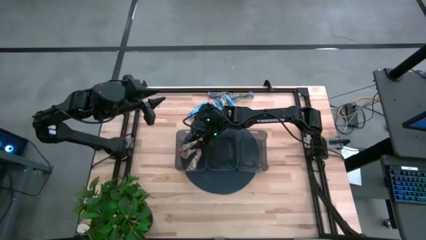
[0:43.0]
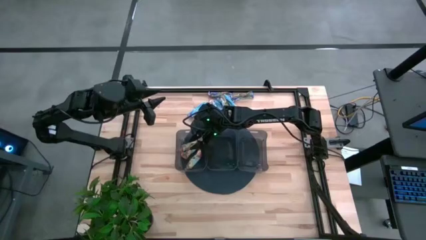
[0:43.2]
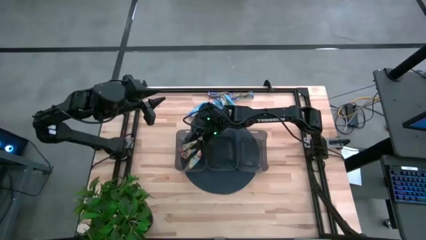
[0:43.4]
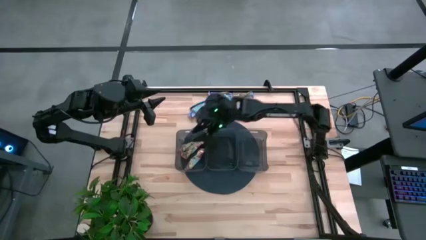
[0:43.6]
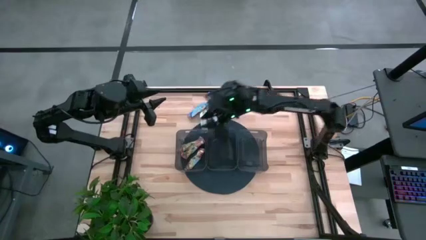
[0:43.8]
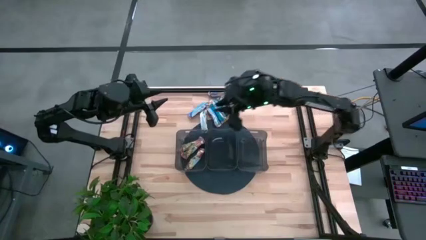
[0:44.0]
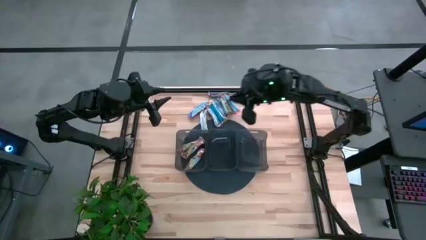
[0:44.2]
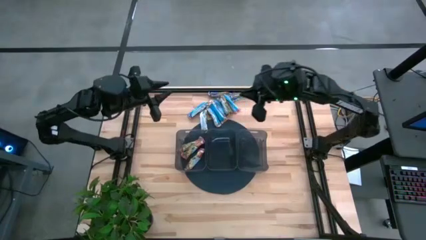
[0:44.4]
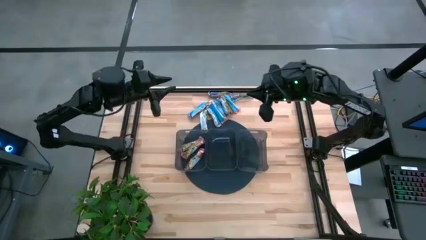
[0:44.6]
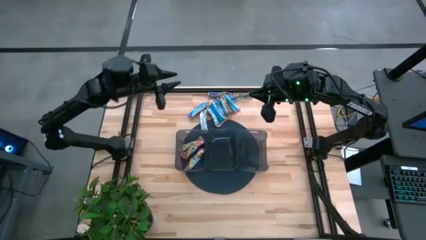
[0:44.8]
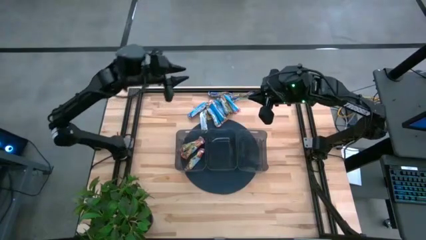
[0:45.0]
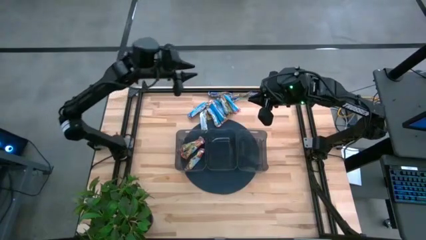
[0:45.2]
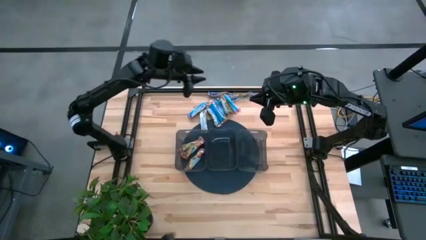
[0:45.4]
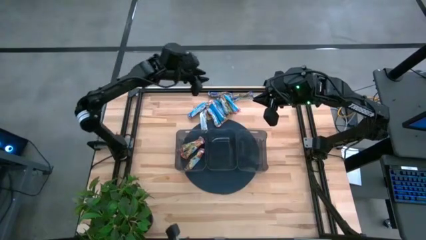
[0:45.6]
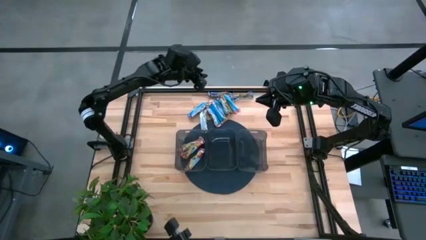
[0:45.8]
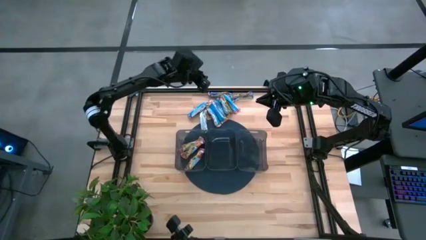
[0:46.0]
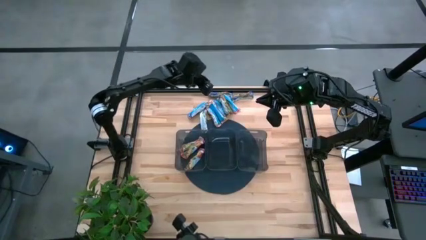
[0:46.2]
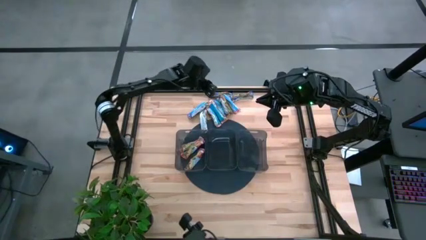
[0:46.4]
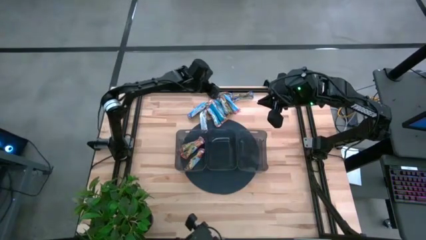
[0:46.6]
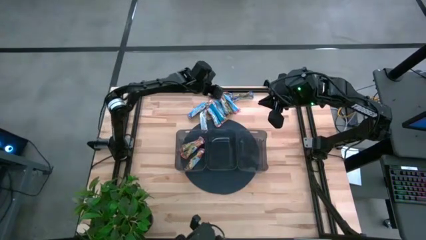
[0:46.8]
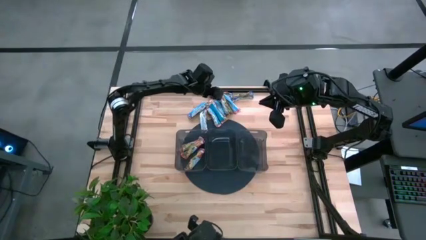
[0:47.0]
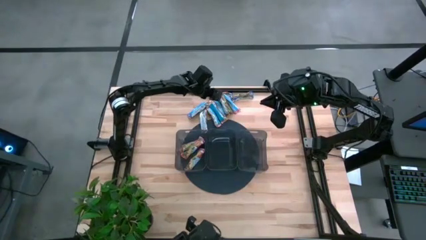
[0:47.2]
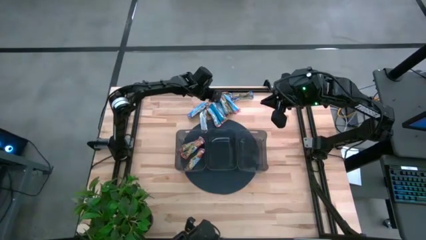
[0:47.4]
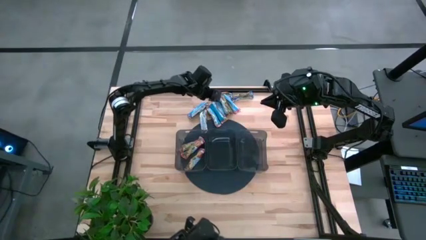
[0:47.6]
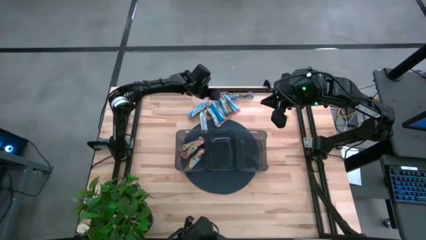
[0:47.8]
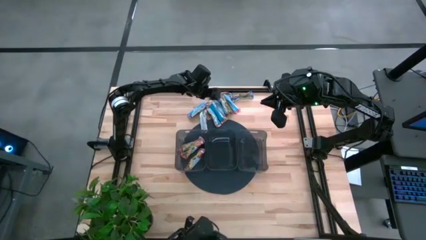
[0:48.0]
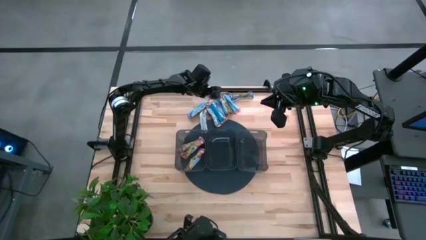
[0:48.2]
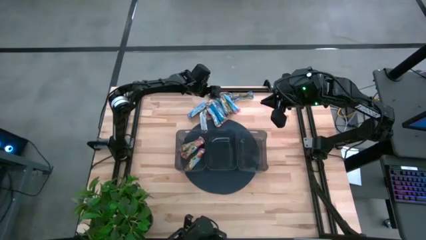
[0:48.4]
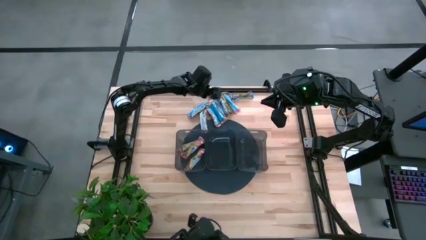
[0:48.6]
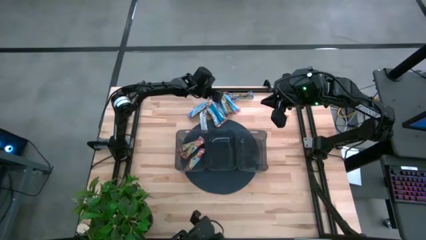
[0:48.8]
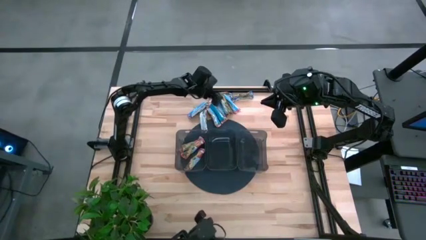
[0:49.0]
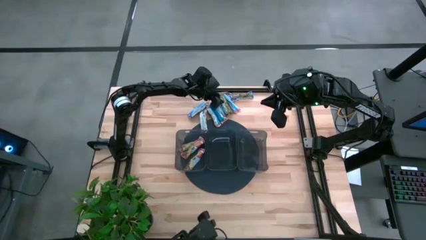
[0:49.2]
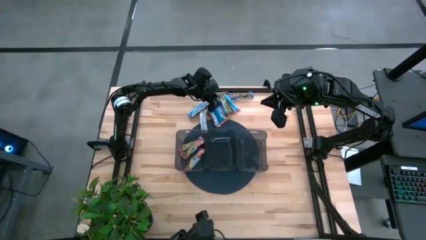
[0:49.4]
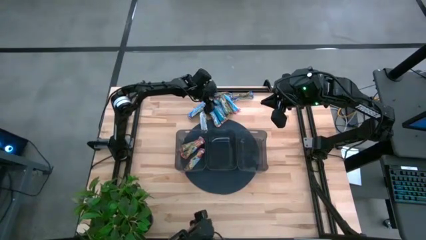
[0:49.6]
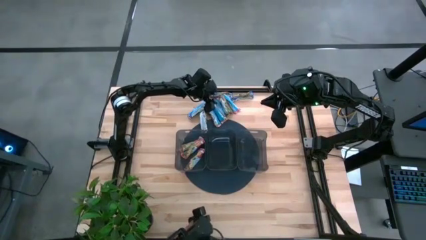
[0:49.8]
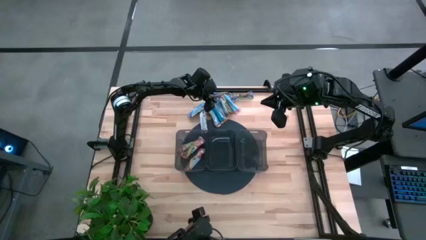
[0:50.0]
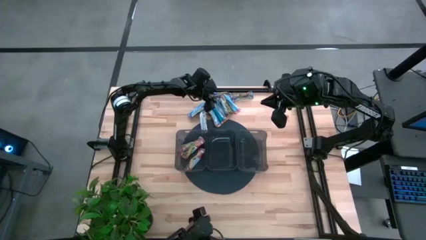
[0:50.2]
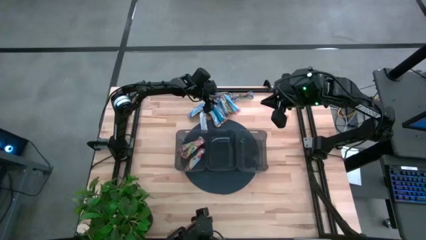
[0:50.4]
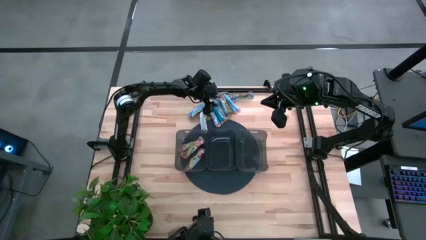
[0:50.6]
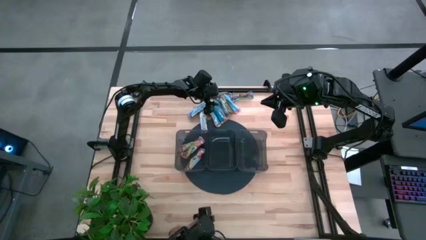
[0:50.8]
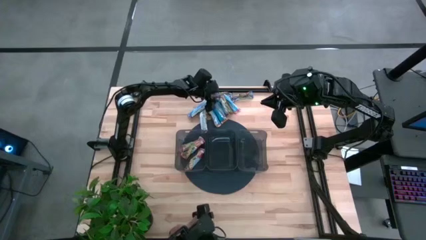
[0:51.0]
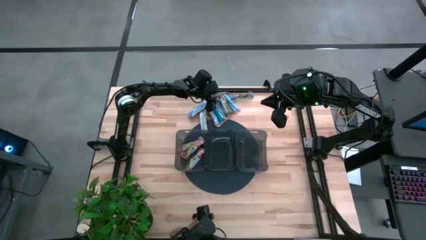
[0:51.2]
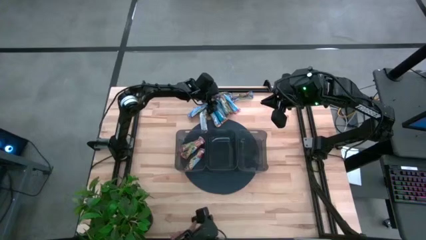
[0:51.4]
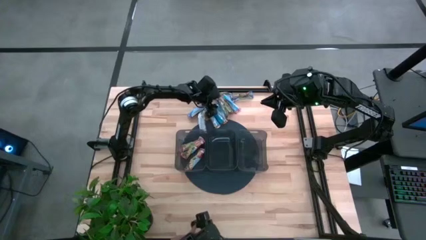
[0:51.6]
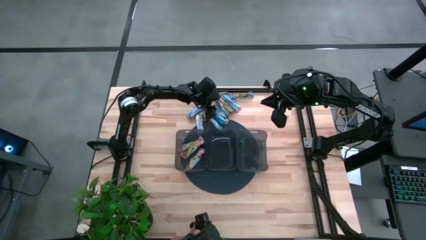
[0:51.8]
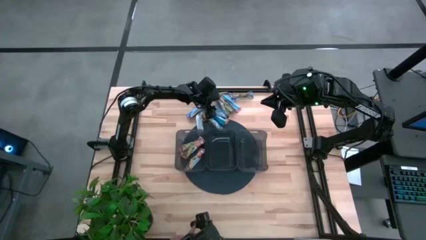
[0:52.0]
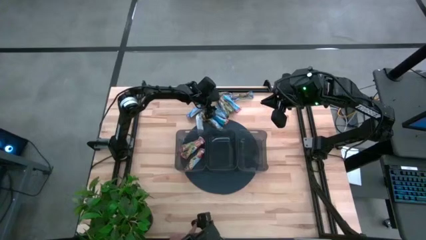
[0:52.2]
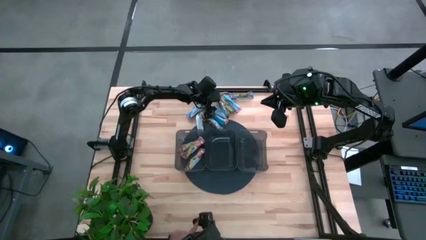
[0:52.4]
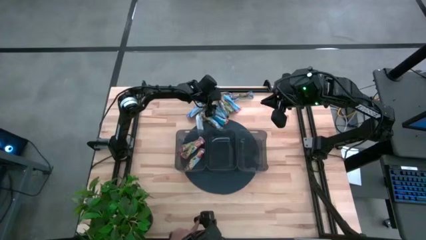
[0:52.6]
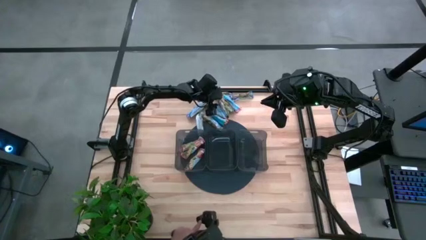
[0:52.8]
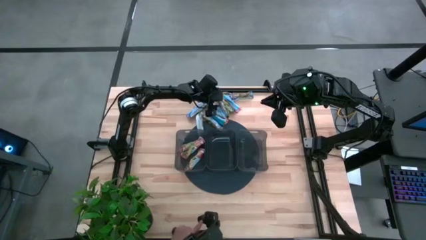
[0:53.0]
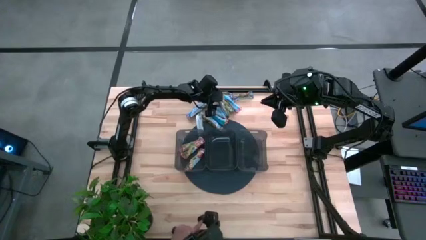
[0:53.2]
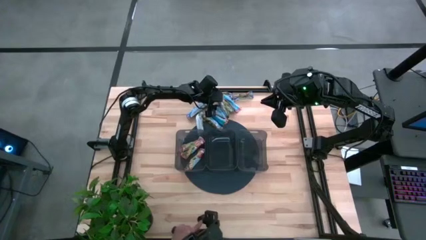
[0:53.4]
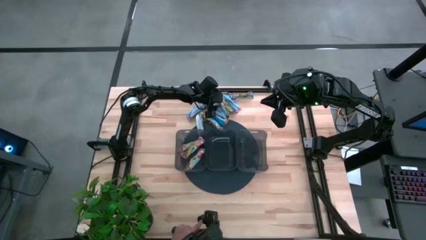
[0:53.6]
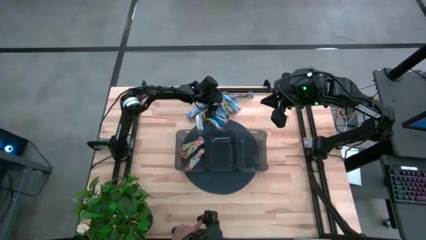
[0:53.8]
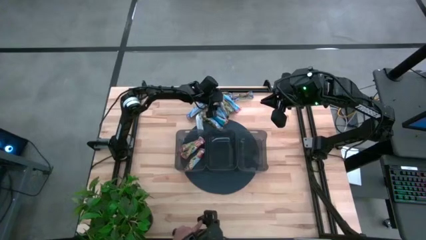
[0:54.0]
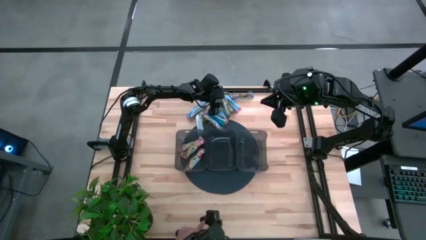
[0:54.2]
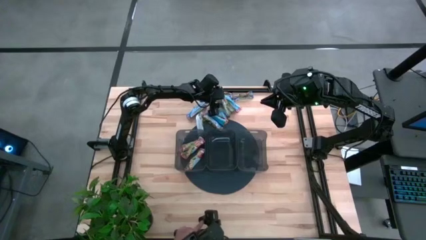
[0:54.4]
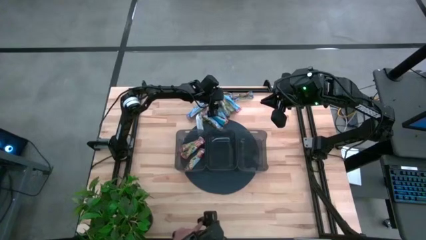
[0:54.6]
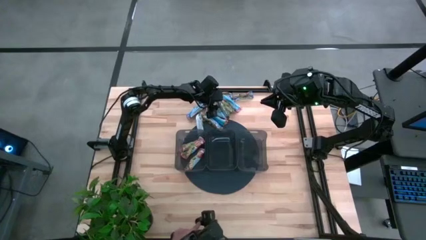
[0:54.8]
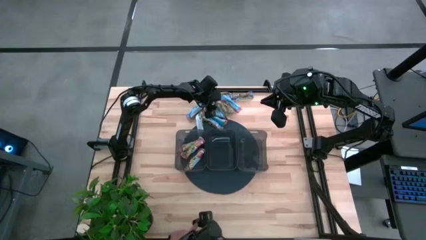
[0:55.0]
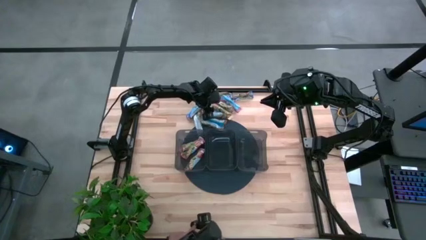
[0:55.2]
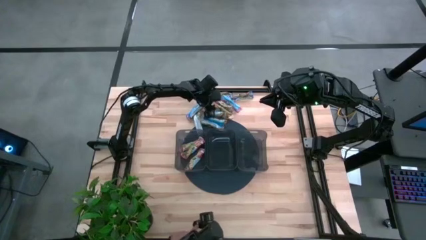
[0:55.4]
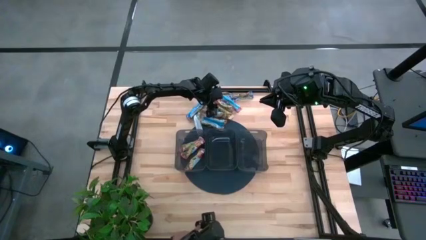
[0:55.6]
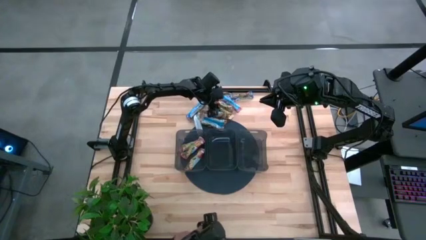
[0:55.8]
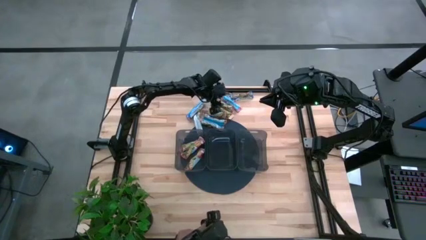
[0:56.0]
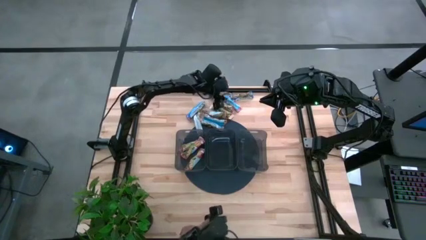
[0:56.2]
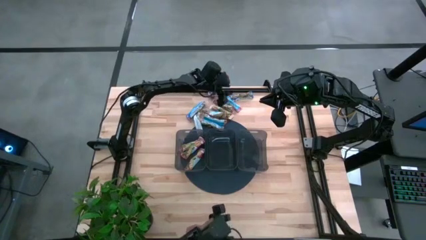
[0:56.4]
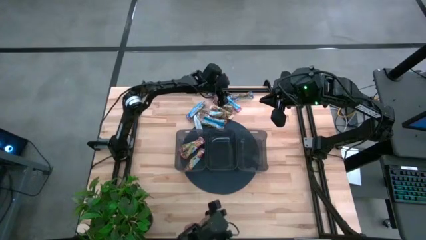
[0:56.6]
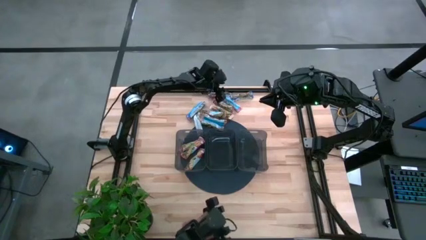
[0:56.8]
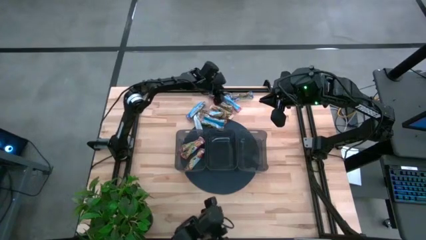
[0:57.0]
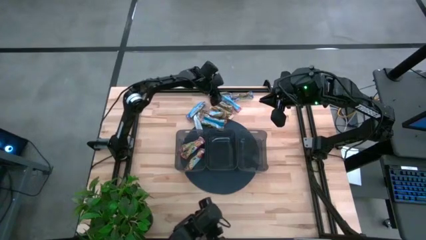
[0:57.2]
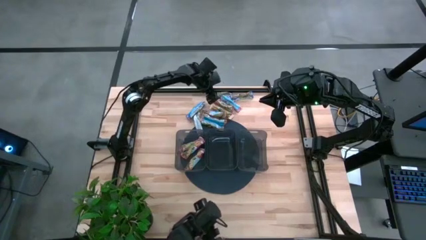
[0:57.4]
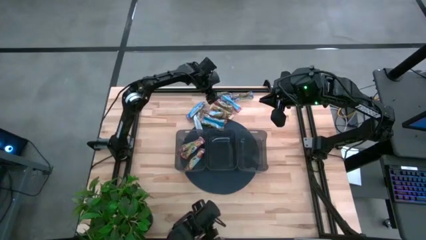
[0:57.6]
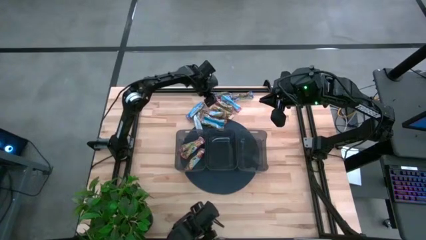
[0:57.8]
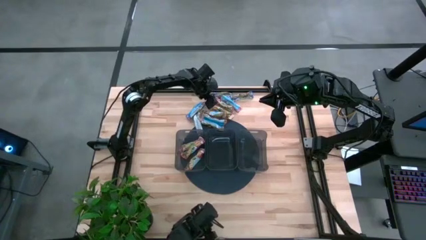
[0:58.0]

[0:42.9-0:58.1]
Task: Pick and place Granola Bars by type
Put the red granola bar into the left black bin
